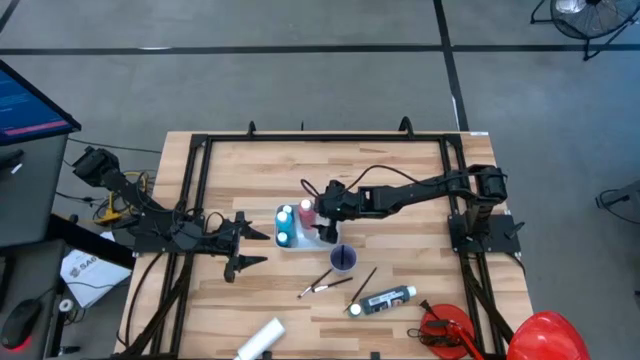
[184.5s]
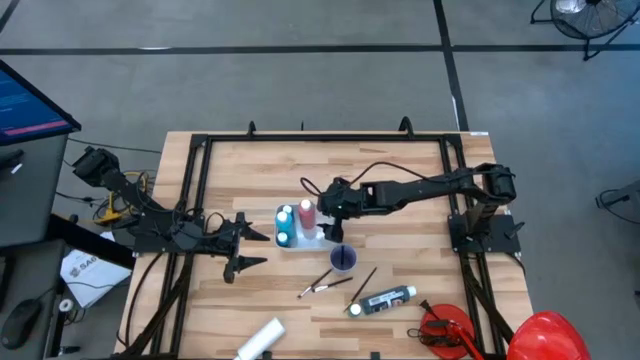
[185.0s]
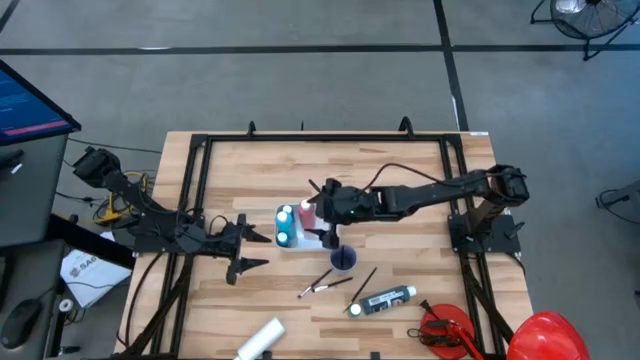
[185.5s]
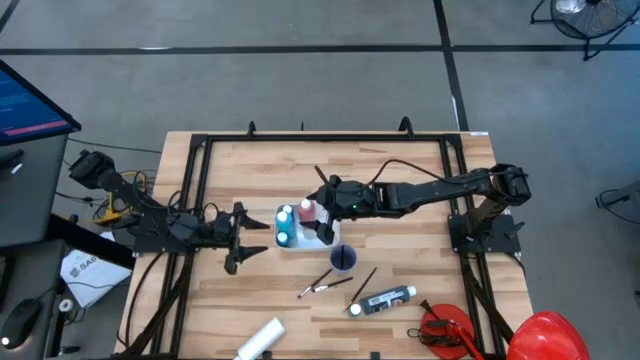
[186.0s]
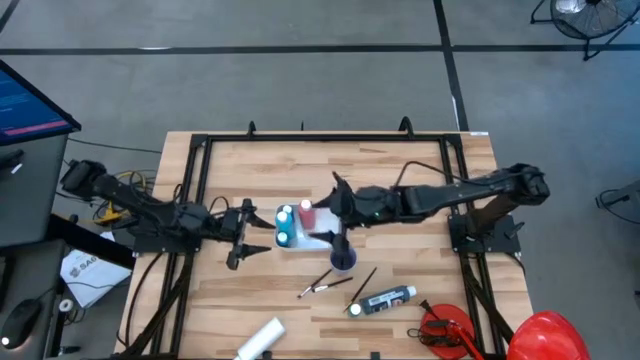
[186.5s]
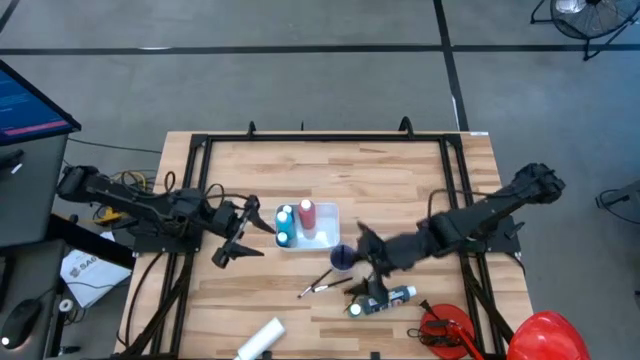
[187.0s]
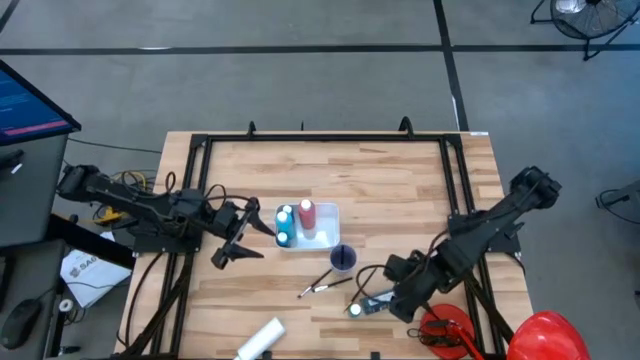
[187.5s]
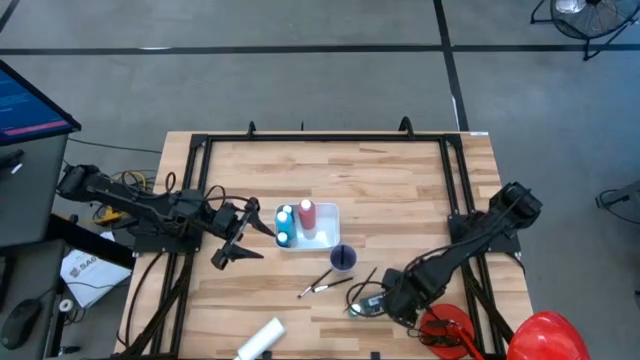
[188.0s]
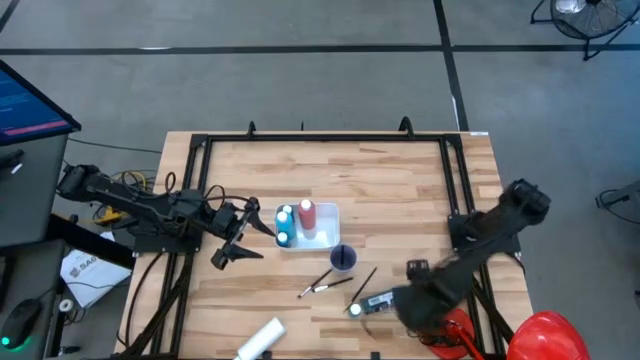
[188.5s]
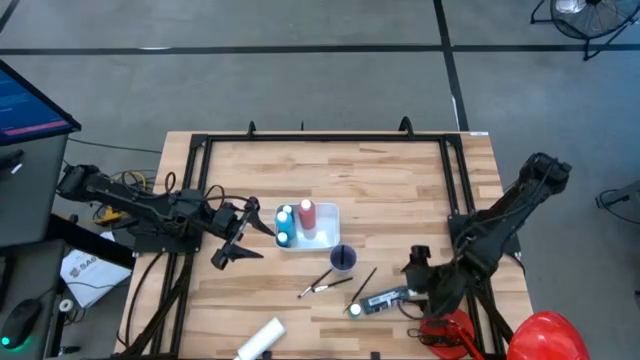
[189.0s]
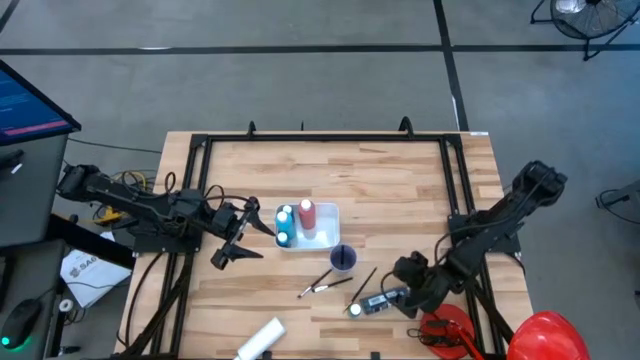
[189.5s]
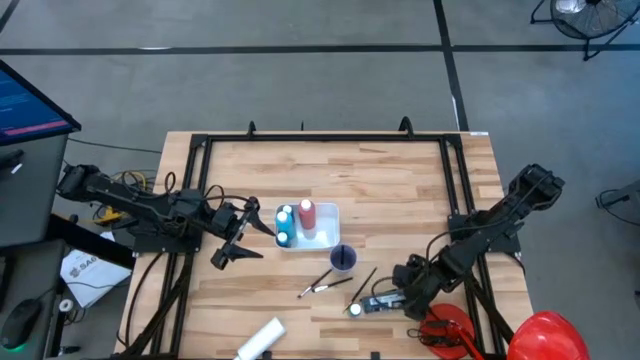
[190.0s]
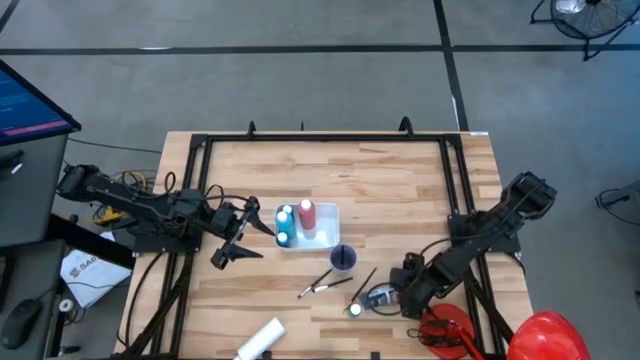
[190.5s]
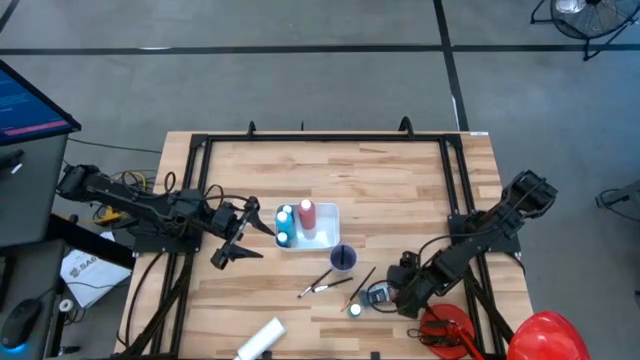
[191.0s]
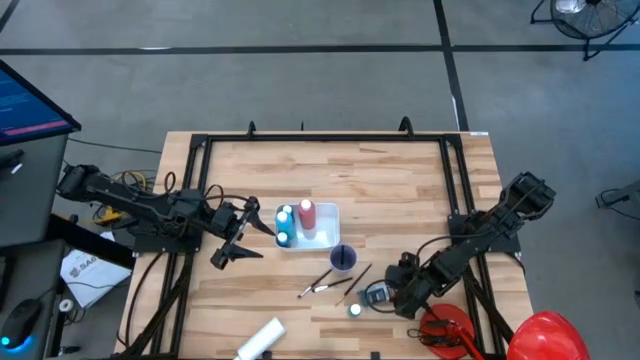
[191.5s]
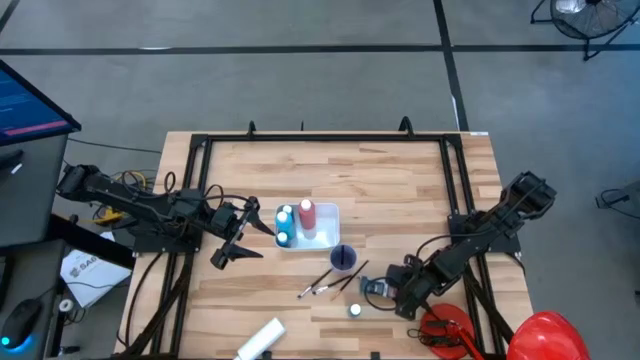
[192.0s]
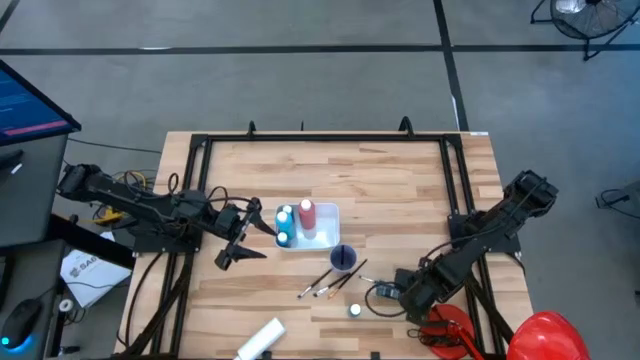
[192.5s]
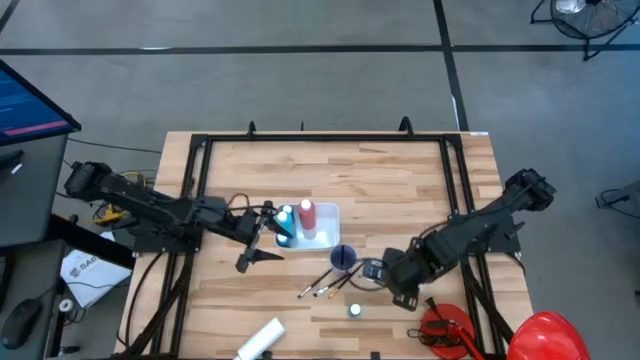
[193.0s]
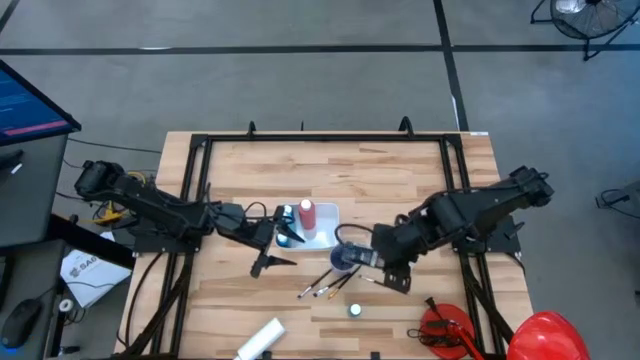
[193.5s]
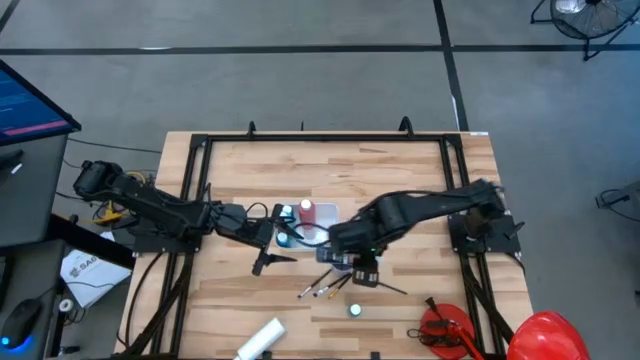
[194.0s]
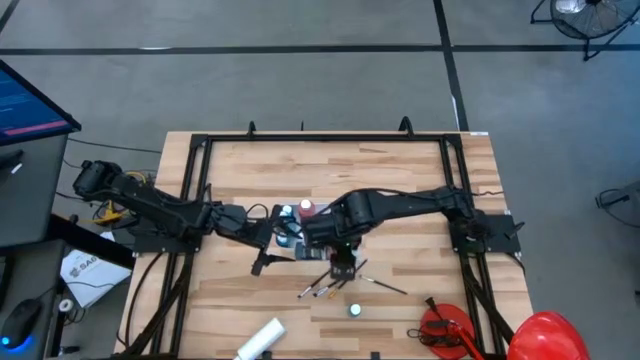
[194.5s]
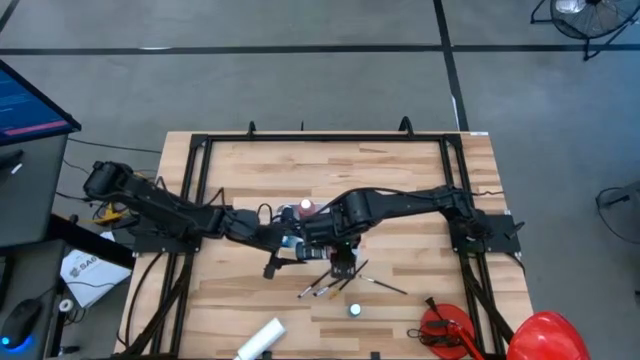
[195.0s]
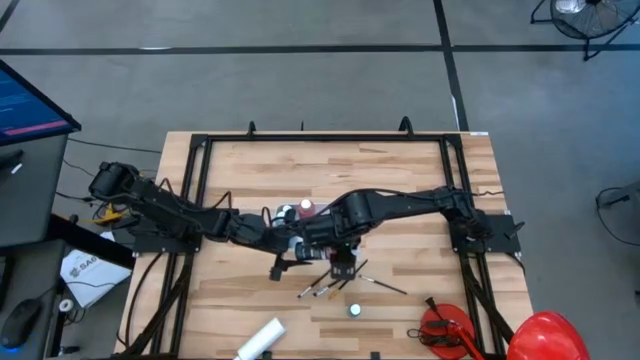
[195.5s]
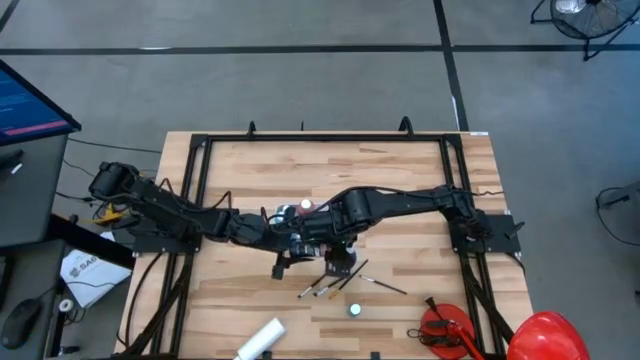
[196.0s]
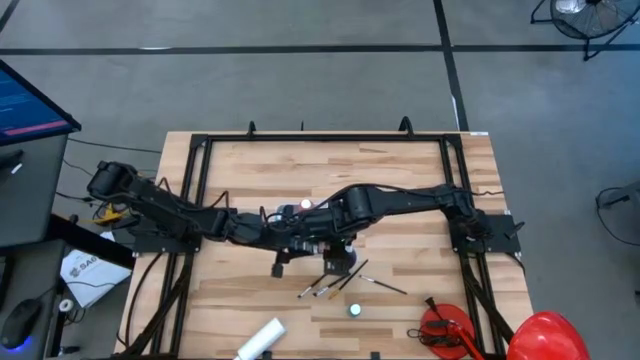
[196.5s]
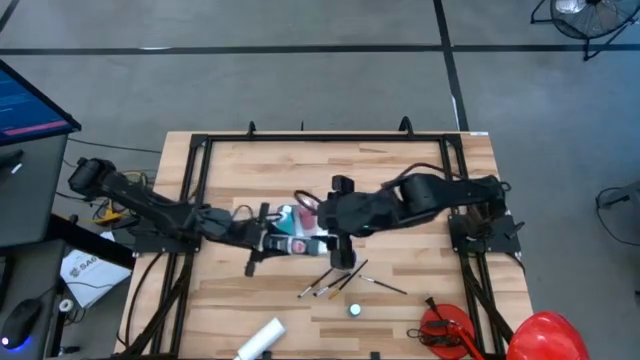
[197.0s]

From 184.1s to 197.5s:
Task: Pick & Place Paint Supplies
Put the black paint bottle into the white bin

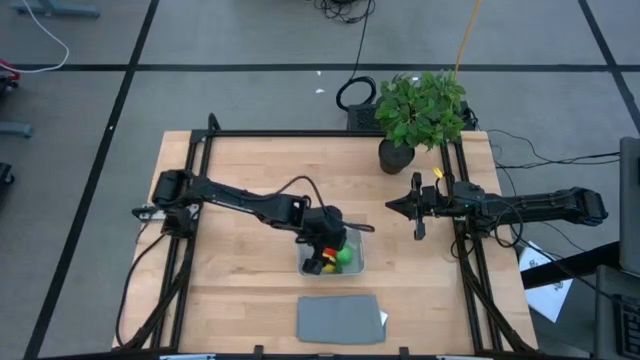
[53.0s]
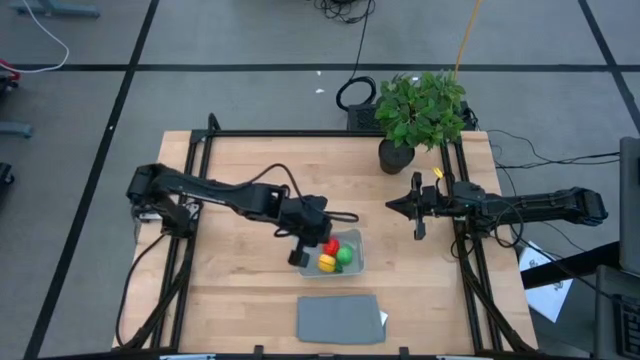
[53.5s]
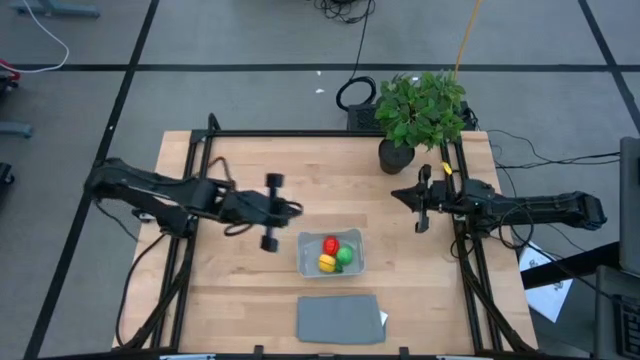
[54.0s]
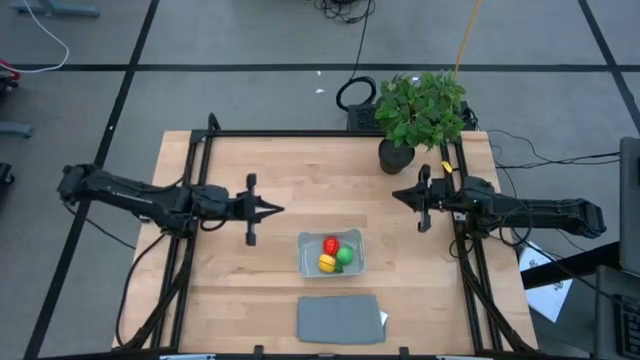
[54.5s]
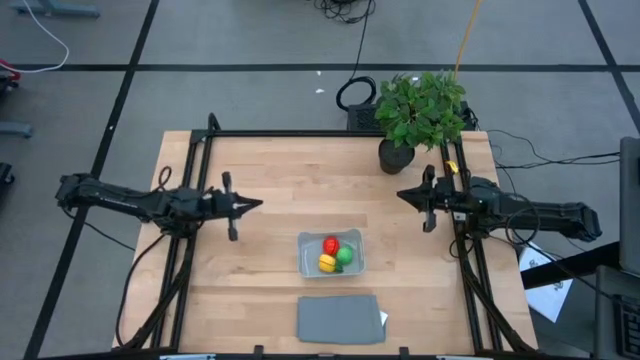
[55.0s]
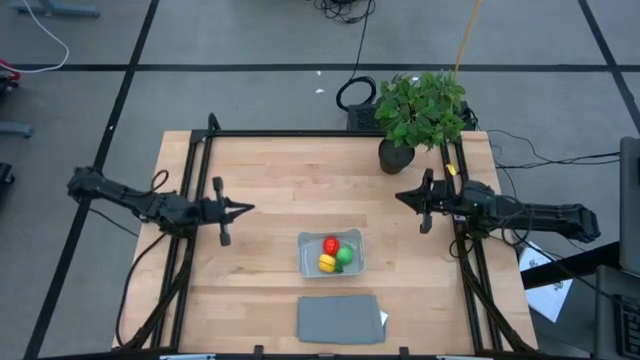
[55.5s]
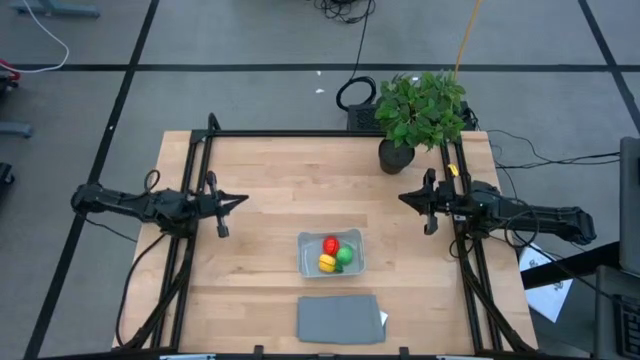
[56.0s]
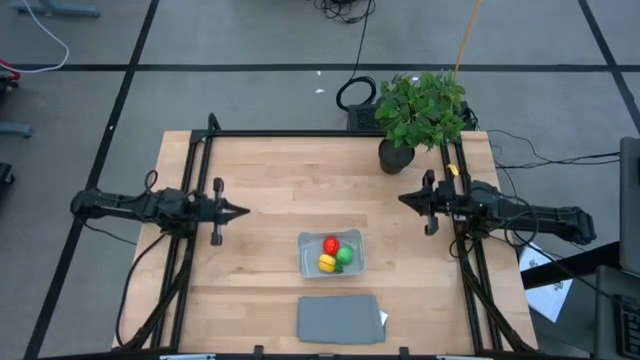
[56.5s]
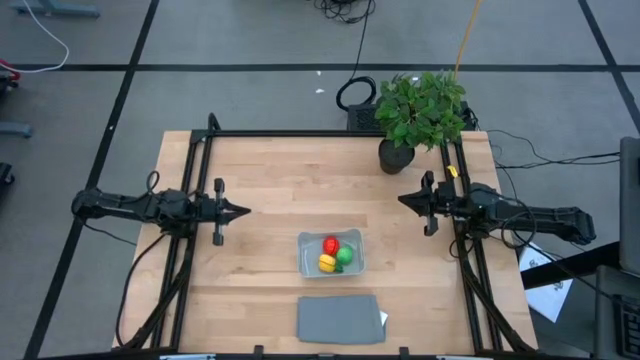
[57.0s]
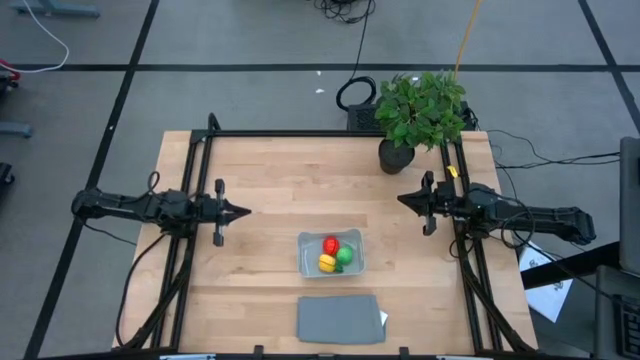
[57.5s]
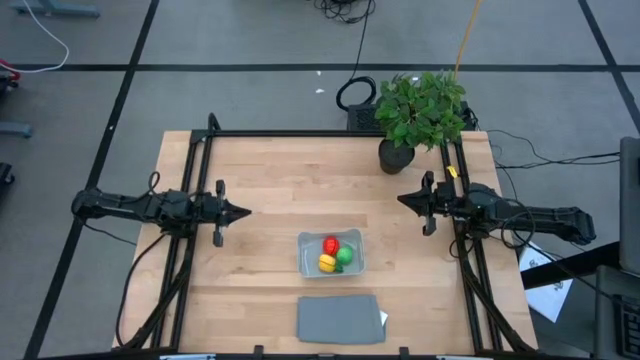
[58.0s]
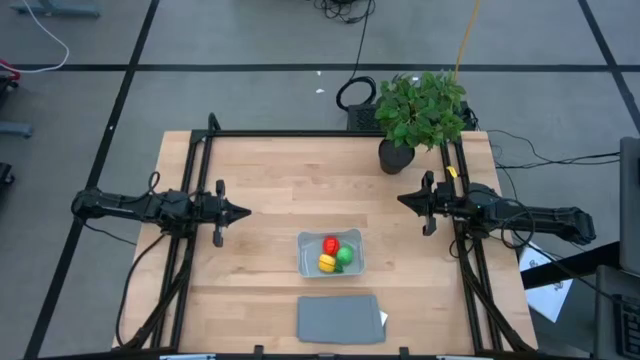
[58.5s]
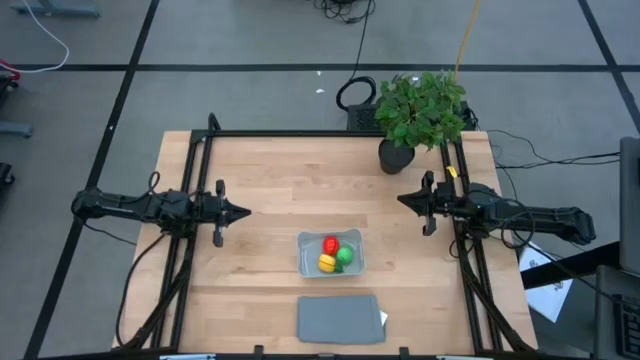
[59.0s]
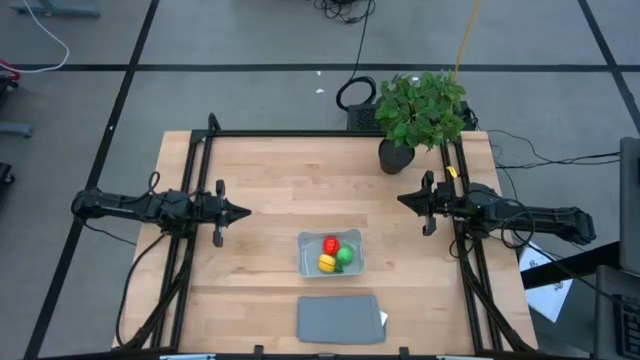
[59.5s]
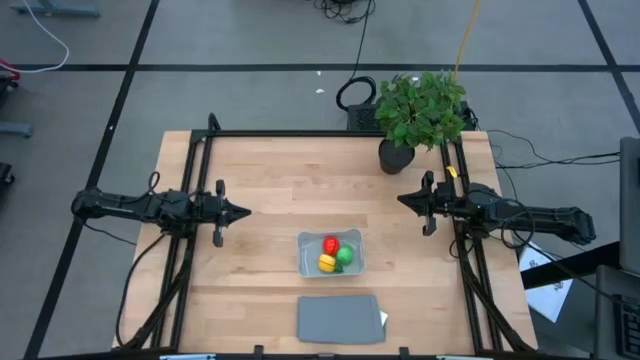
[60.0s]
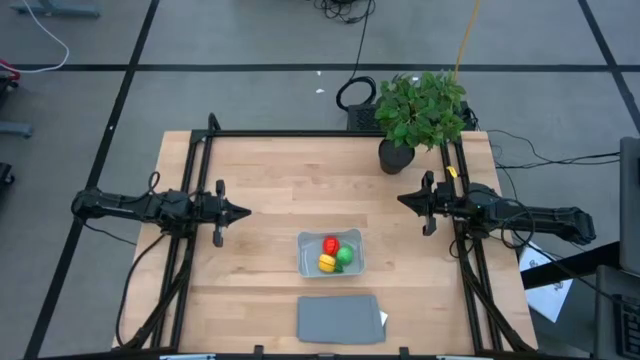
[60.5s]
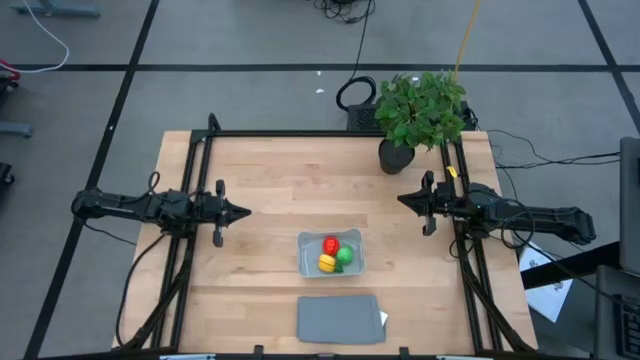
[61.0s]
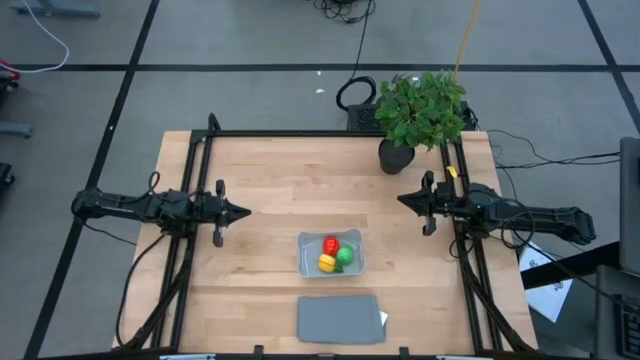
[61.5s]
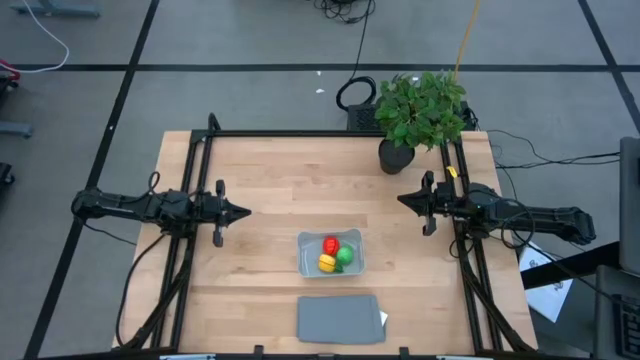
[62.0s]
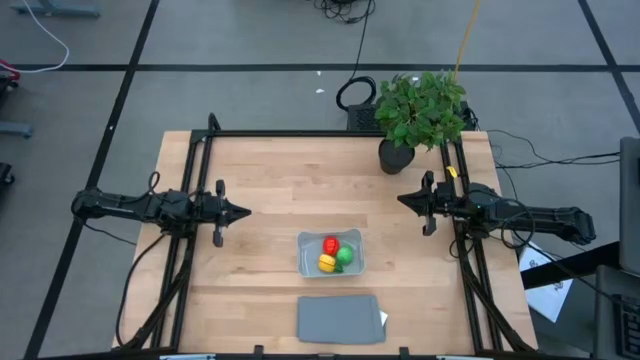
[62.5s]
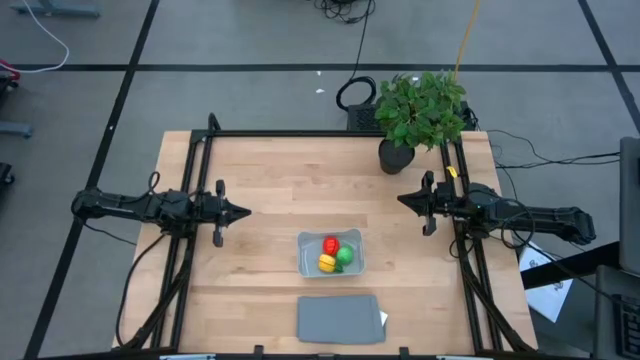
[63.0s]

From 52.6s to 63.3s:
Task: Pick and placing Produce into tupperware
Return to Home Position
